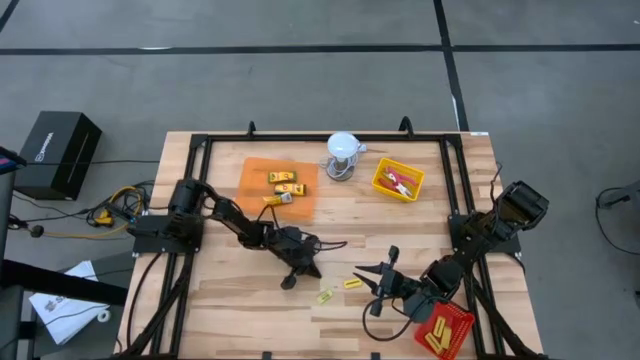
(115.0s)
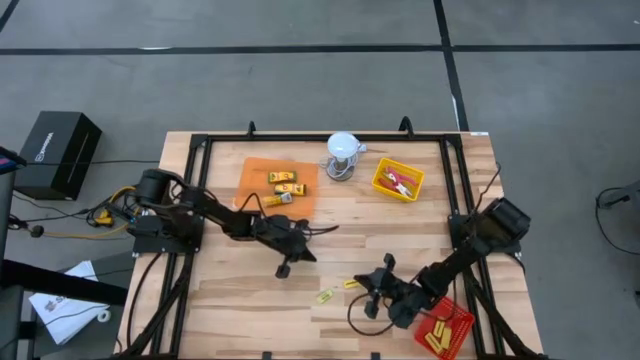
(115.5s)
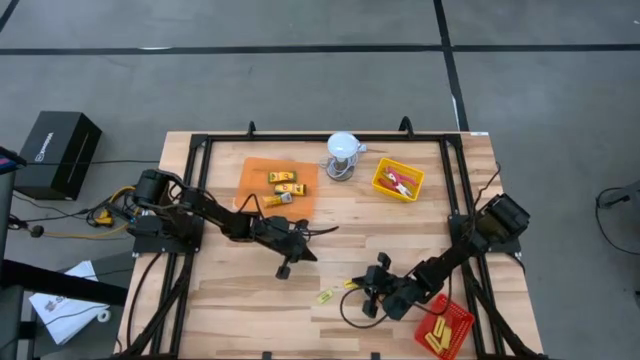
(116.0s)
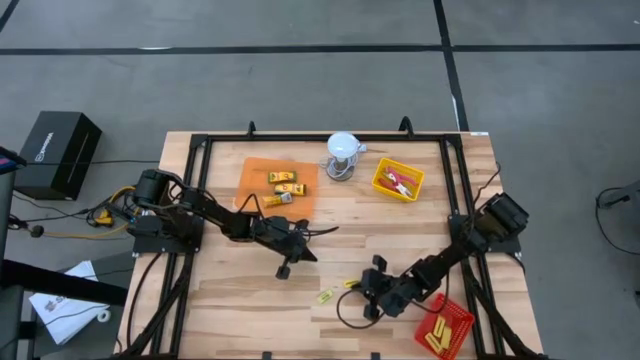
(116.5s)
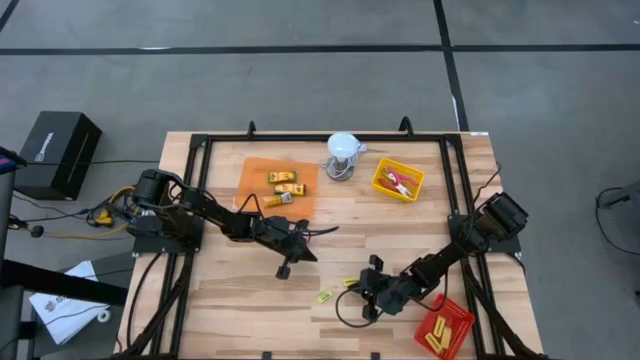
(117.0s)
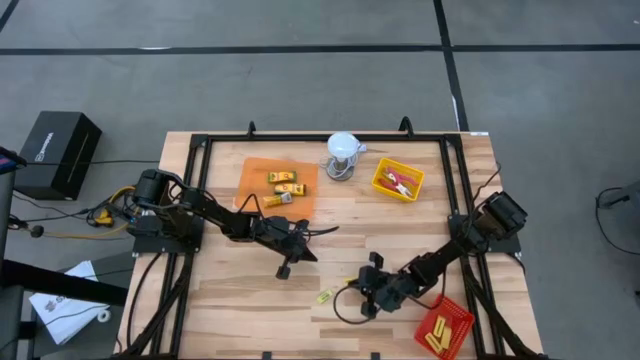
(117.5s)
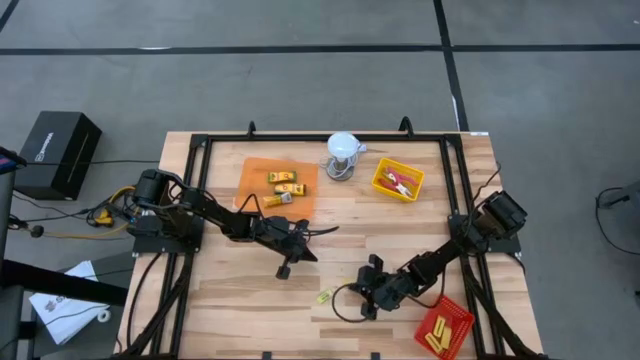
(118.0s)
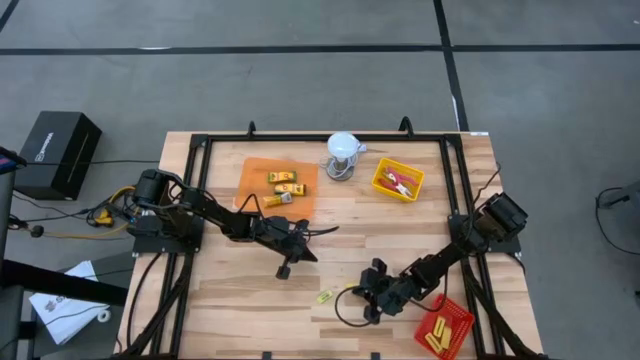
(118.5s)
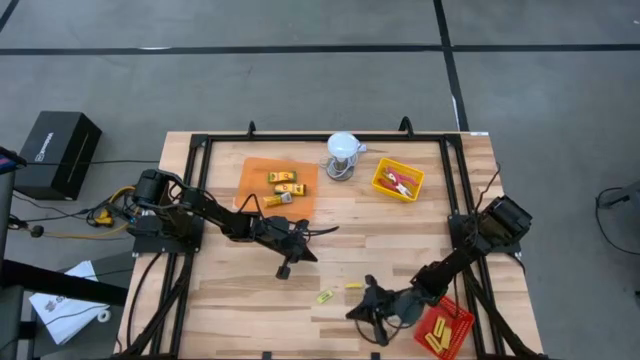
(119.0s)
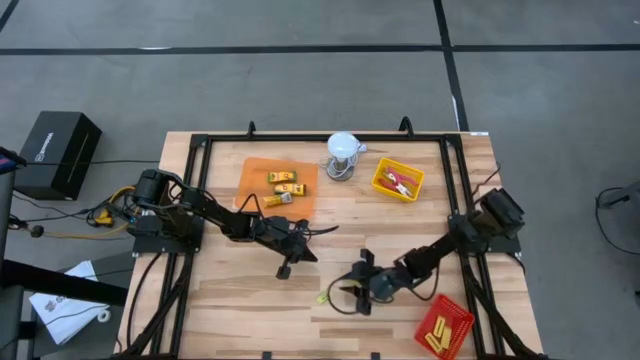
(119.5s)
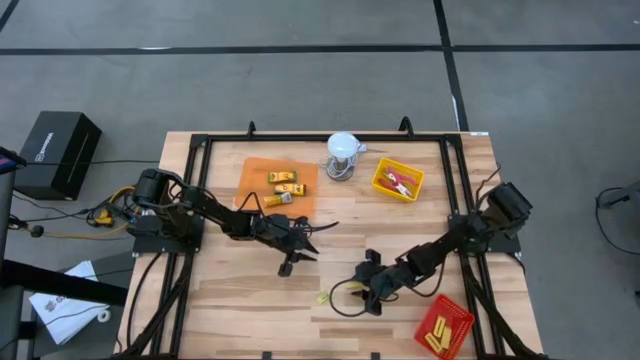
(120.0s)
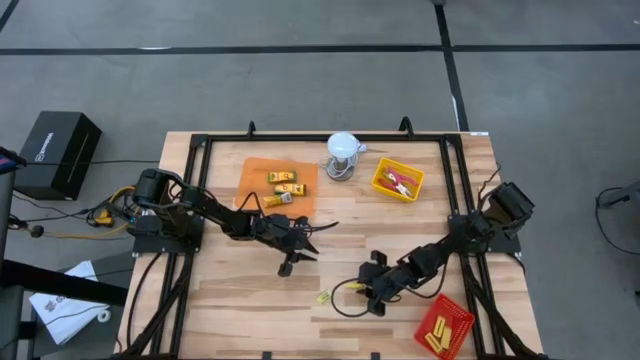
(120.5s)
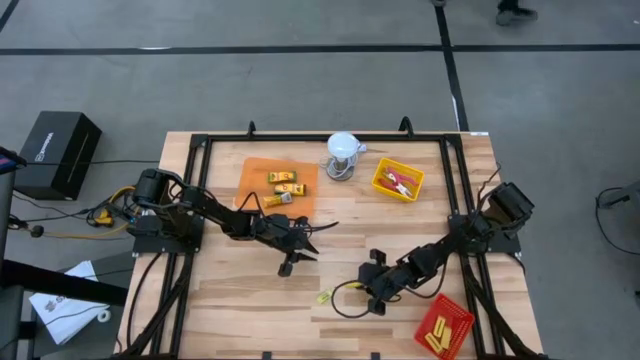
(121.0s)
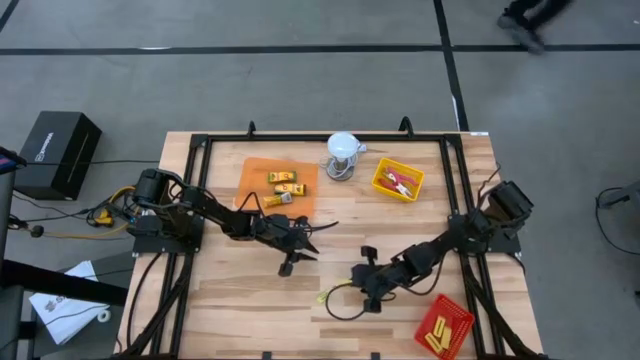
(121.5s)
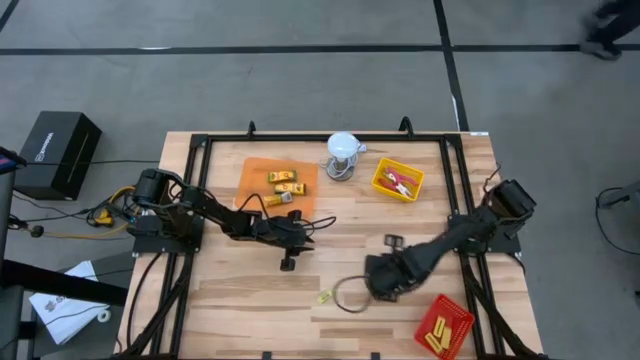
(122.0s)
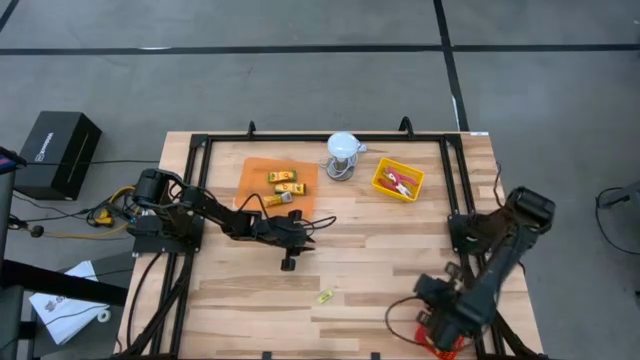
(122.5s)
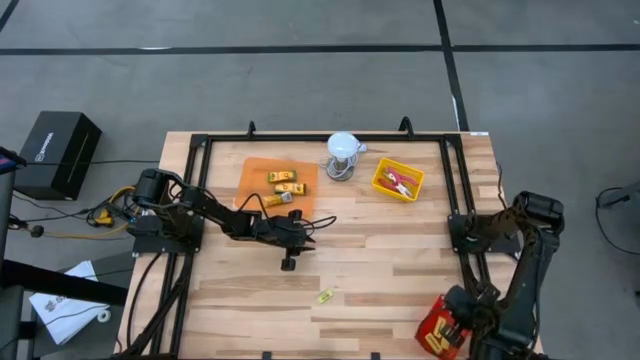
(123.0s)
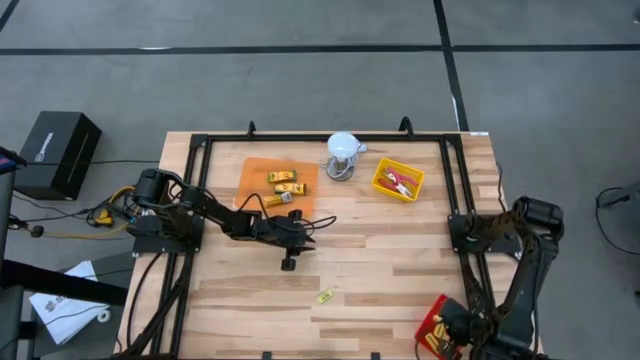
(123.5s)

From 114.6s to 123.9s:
Task: Pick & Place School Supplies
Put the yellow eraser into the red bin

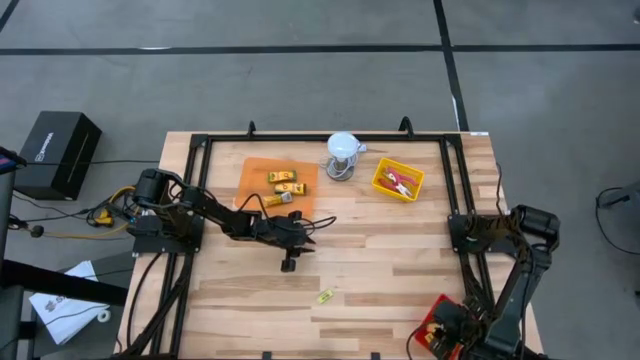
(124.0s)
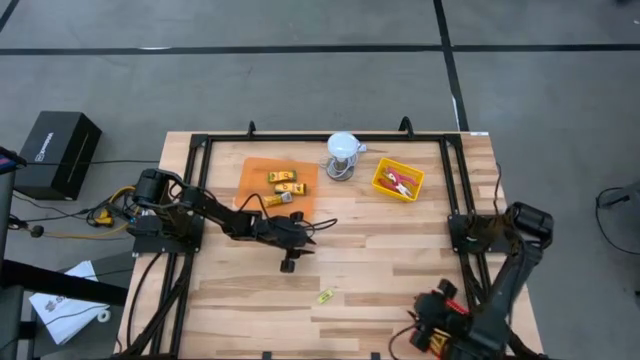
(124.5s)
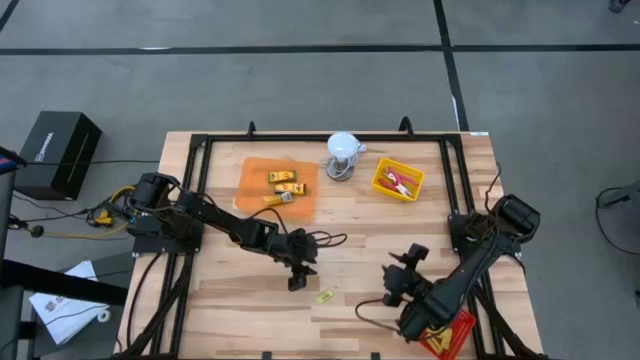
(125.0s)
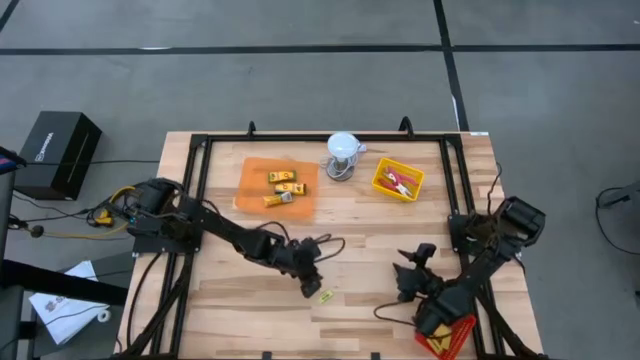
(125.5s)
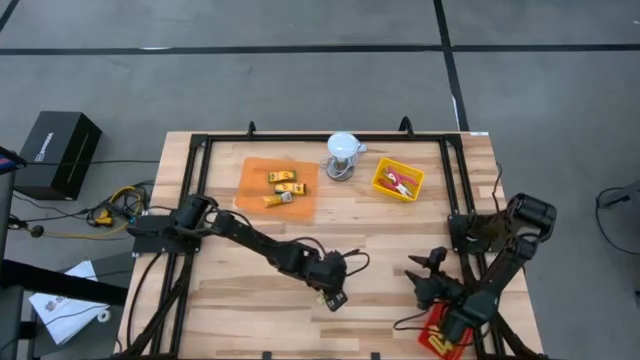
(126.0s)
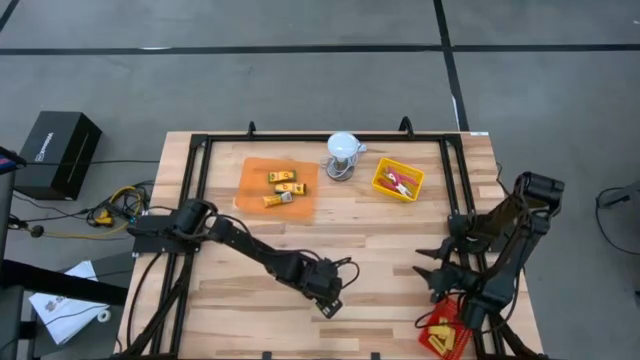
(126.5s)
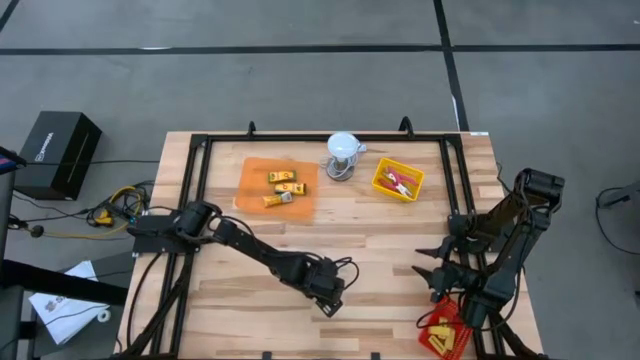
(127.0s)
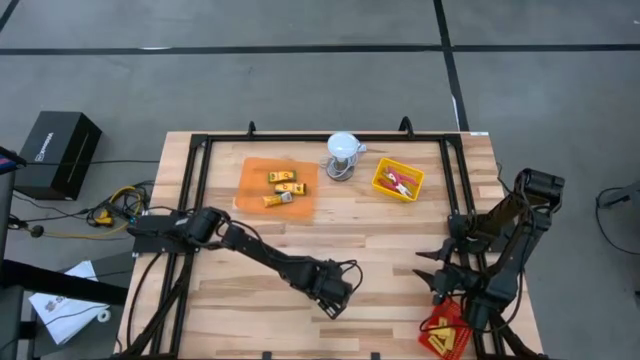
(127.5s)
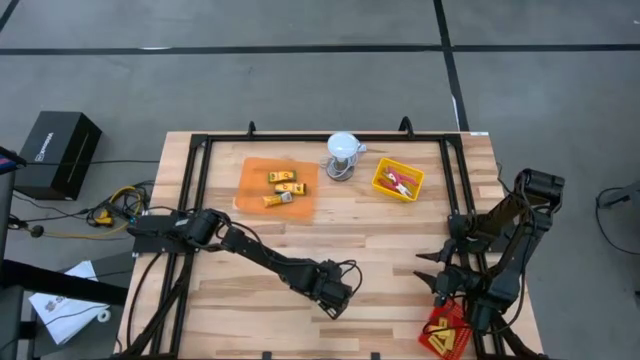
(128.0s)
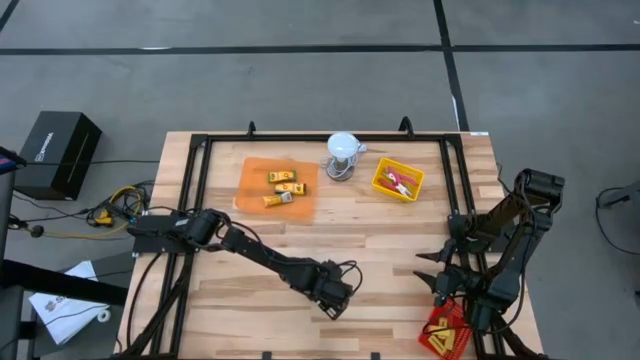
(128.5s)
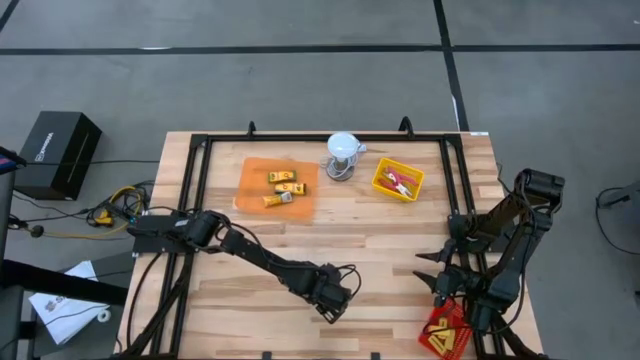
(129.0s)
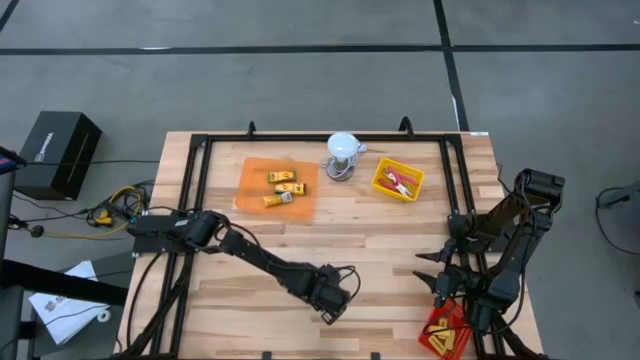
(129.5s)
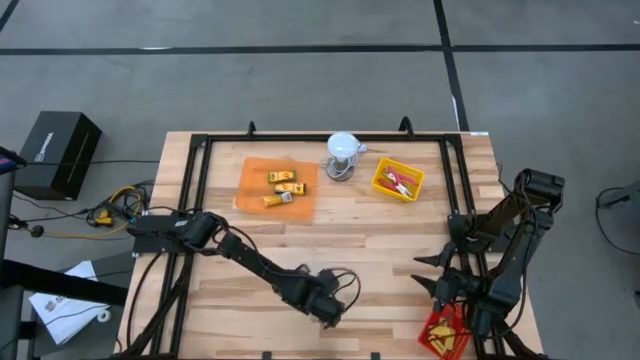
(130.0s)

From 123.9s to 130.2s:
Put the green eraser into the red bin

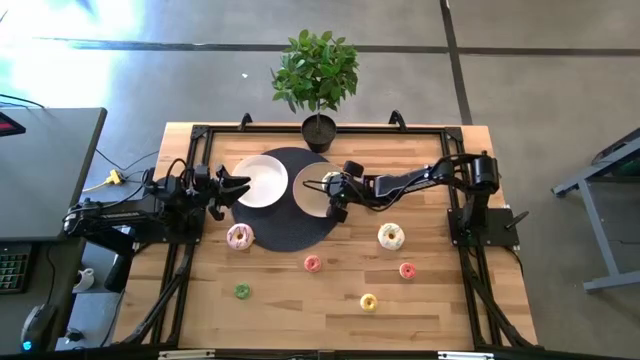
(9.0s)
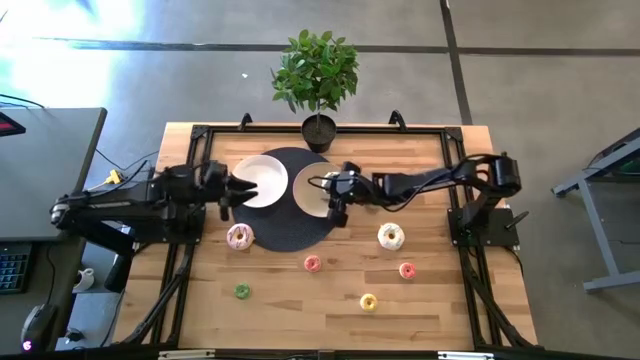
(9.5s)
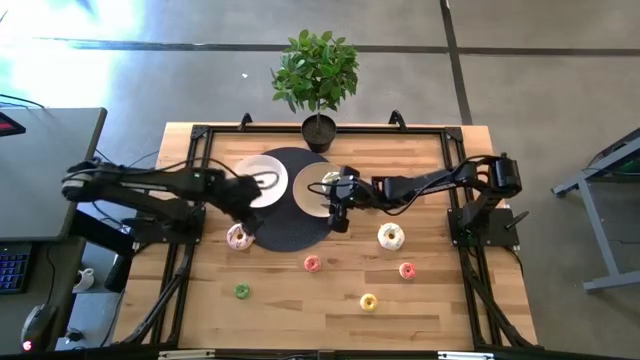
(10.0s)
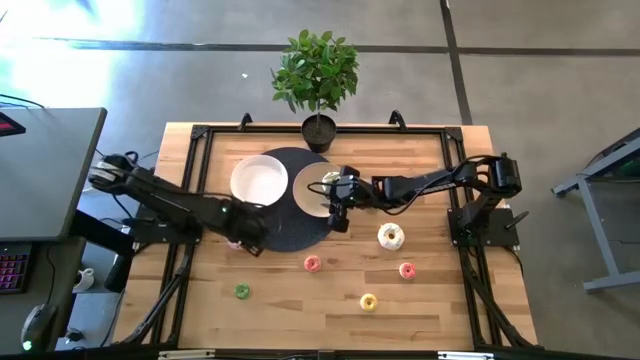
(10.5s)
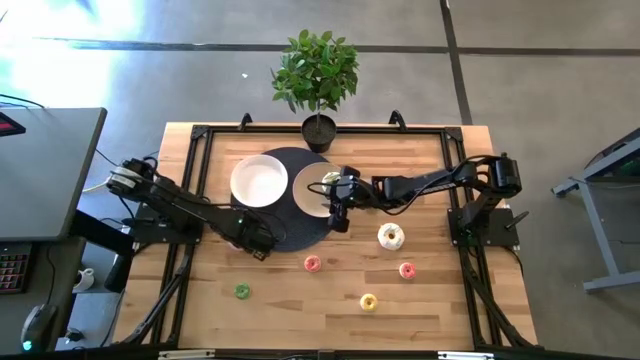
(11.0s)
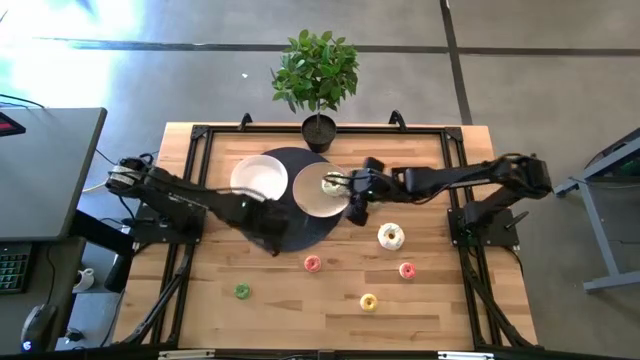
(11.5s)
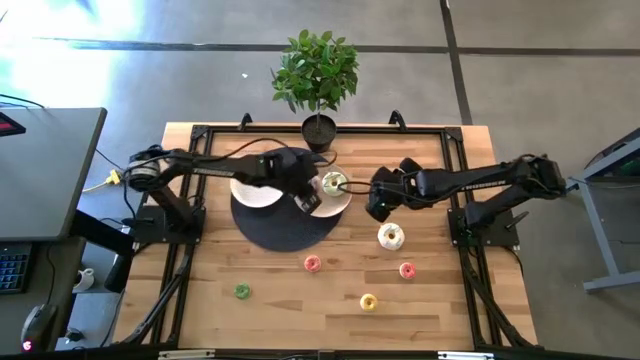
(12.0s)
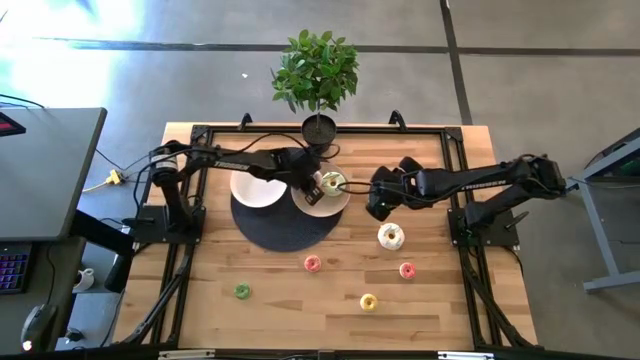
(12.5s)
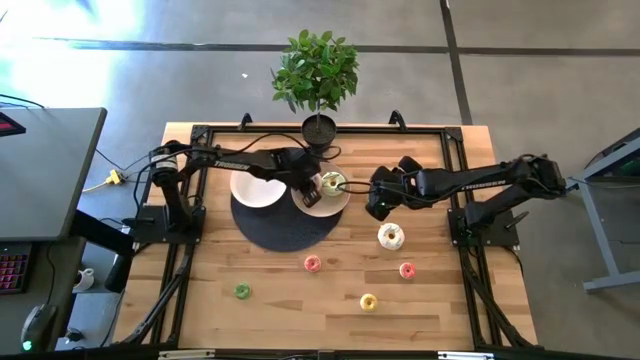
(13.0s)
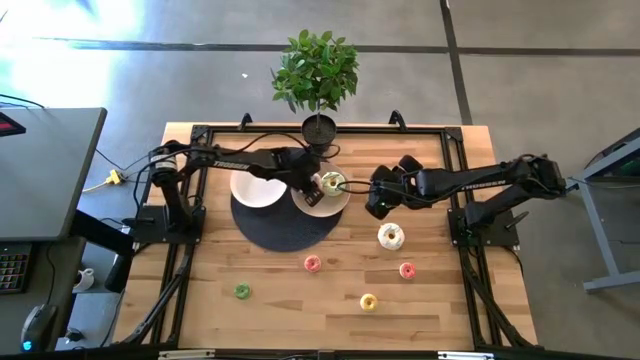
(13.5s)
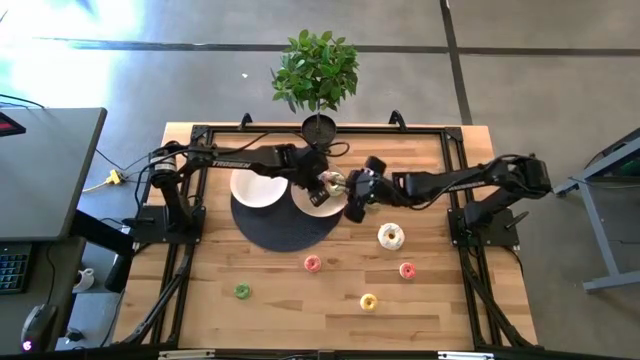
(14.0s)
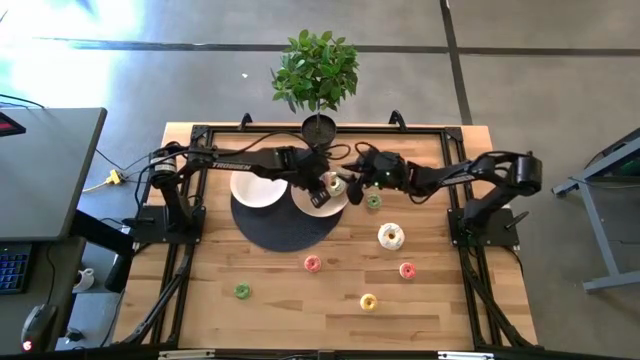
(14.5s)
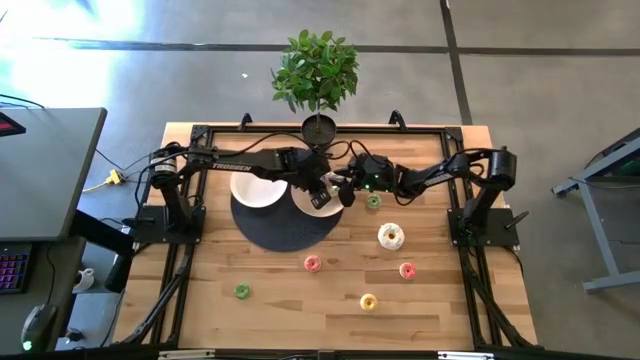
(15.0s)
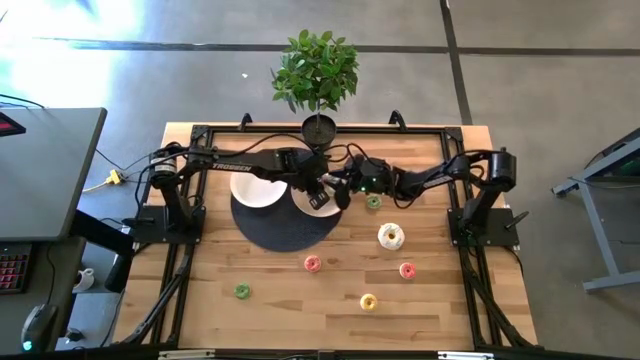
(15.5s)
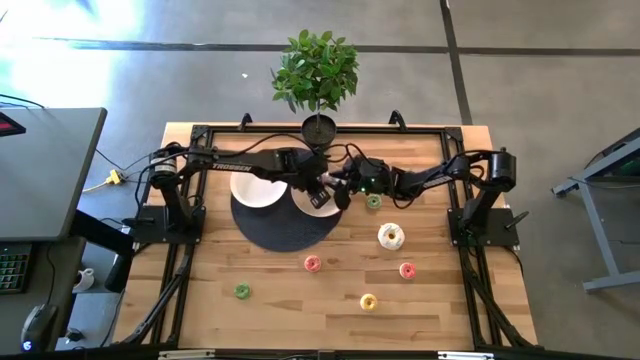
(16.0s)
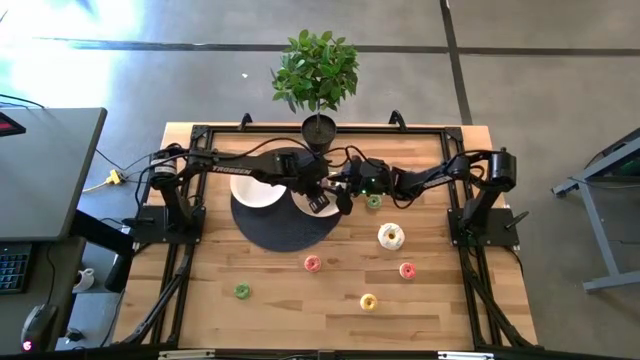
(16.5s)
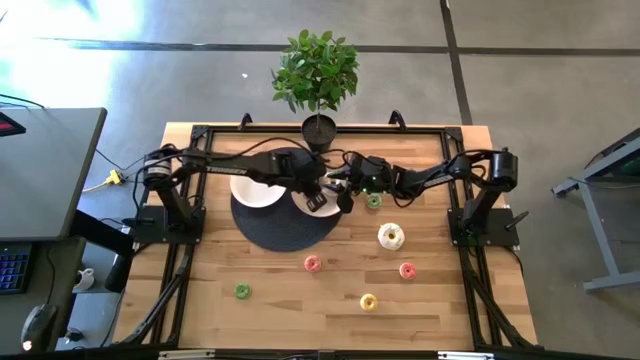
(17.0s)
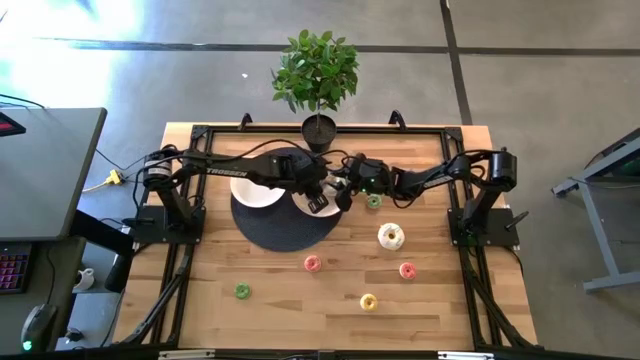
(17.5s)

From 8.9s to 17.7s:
Task: Pick & Place donuts
Put the large purple donut onto the brown plate
